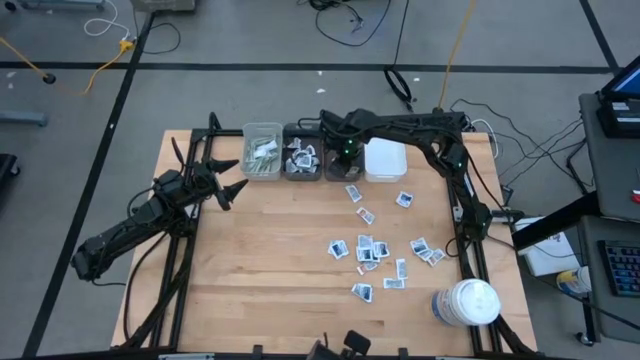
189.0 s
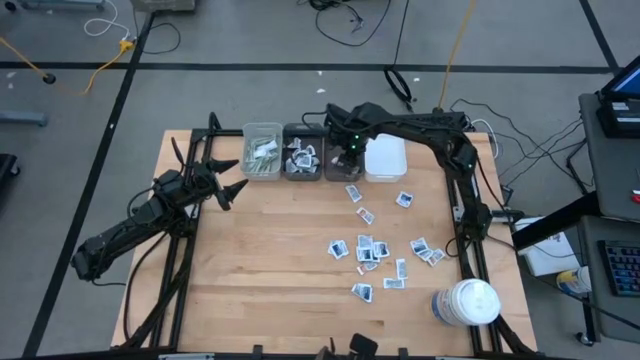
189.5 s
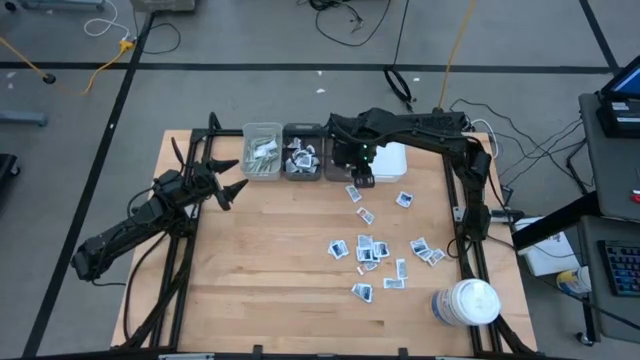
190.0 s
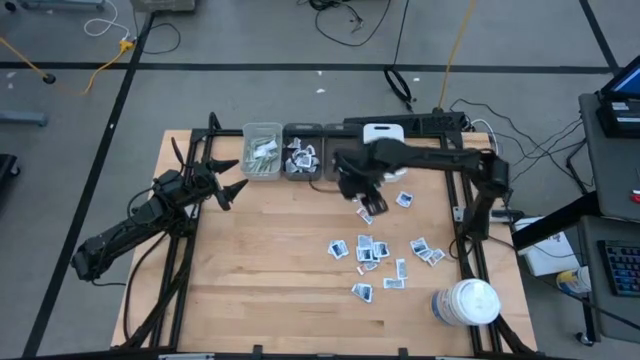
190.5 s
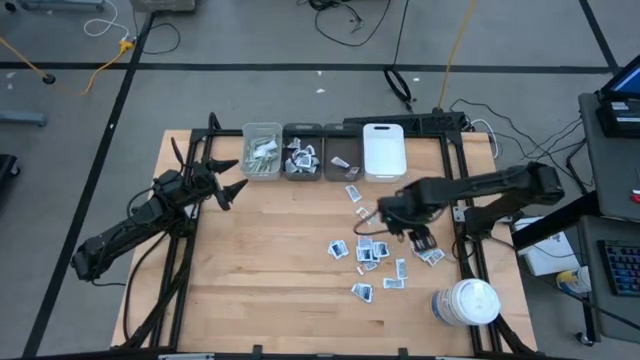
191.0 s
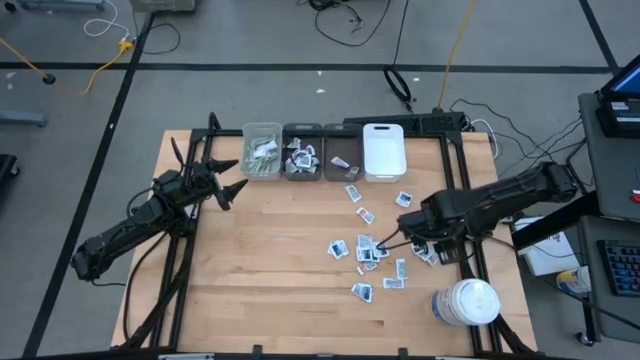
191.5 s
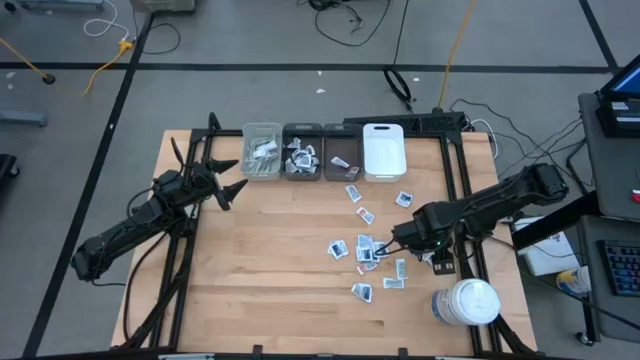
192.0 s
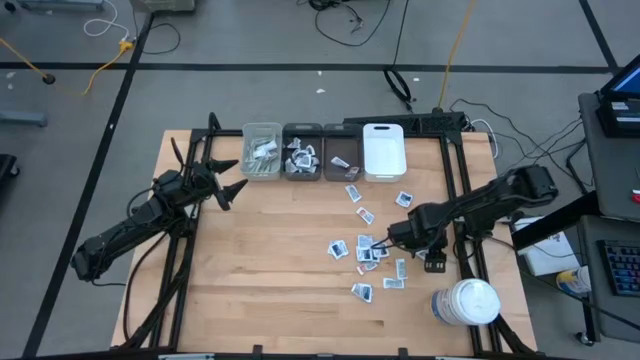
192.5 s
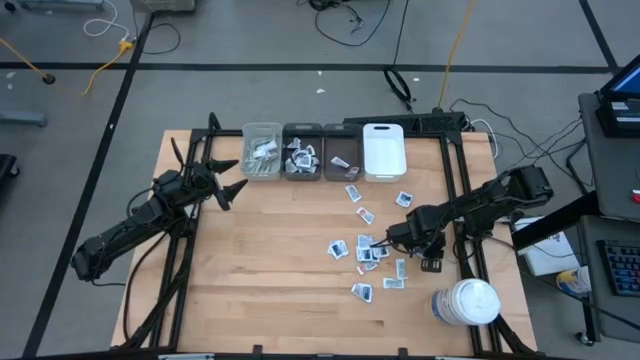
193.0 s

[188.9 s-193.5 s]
Task: Pick & Place First Aid Supplies
Put the ointment pack into the right black bin

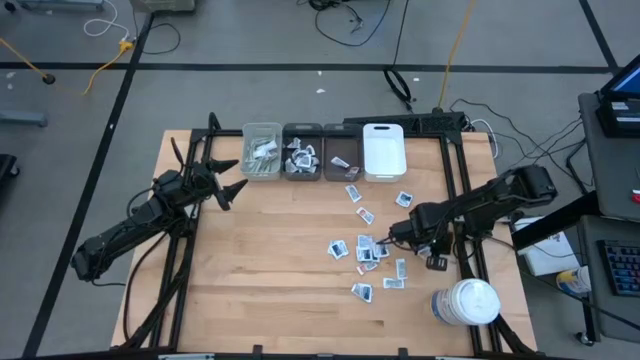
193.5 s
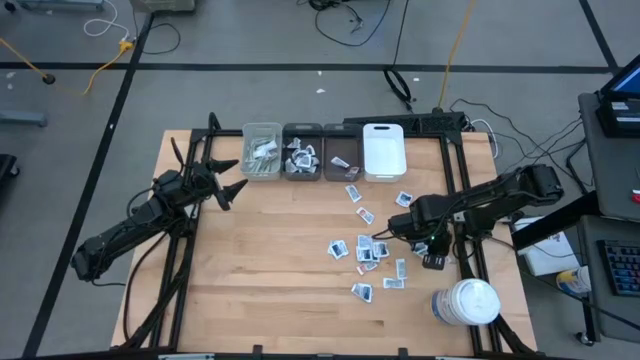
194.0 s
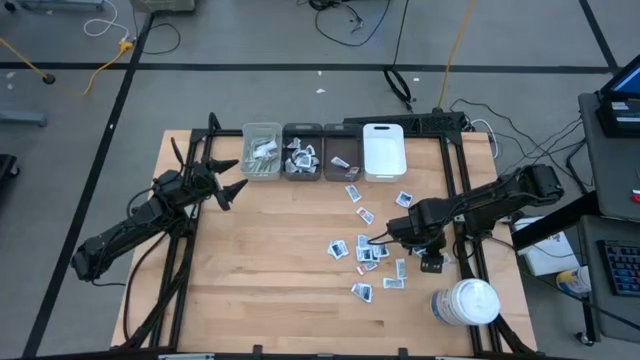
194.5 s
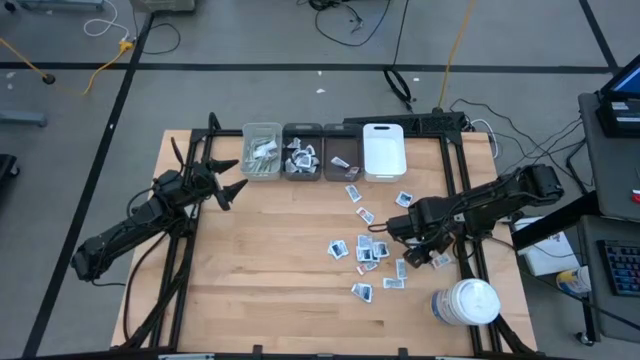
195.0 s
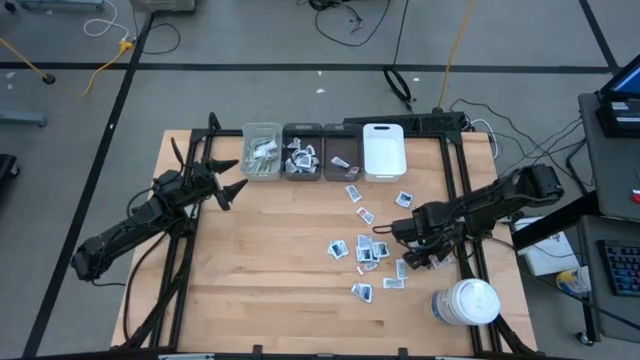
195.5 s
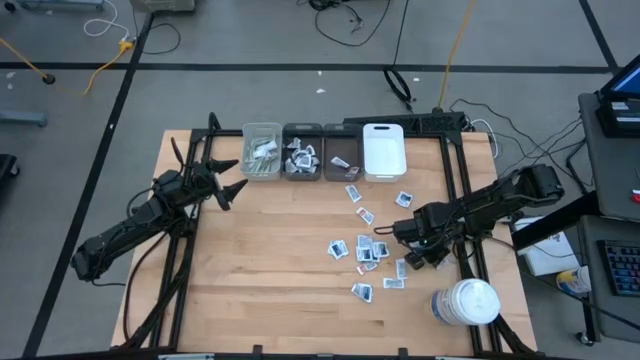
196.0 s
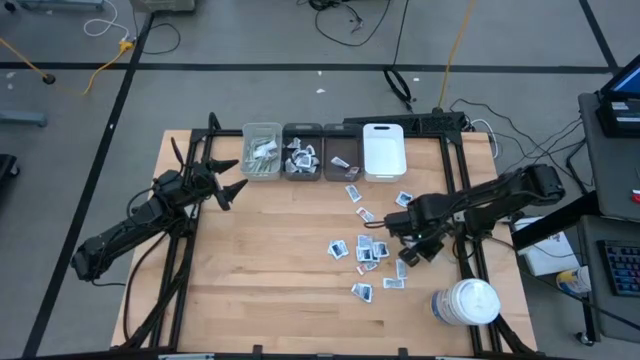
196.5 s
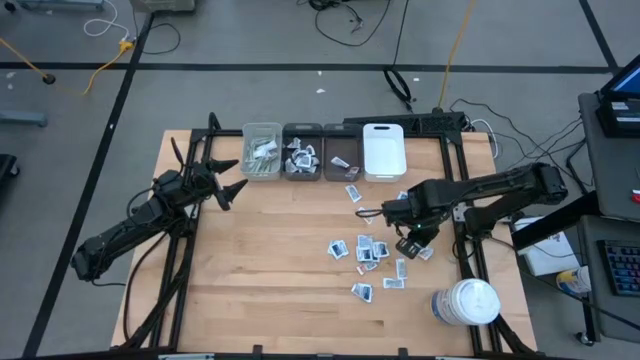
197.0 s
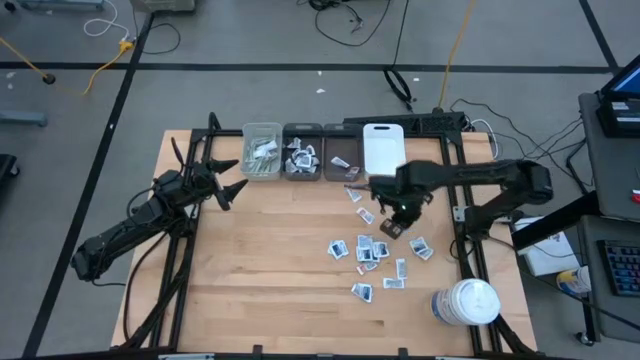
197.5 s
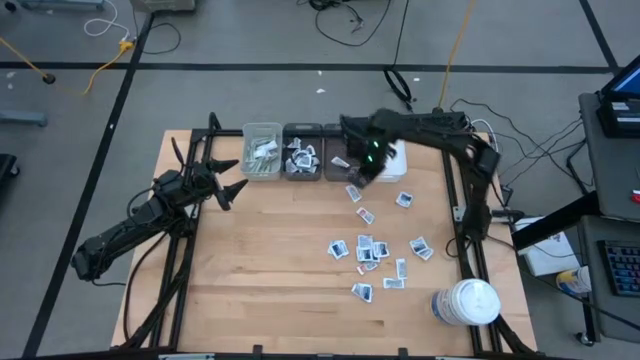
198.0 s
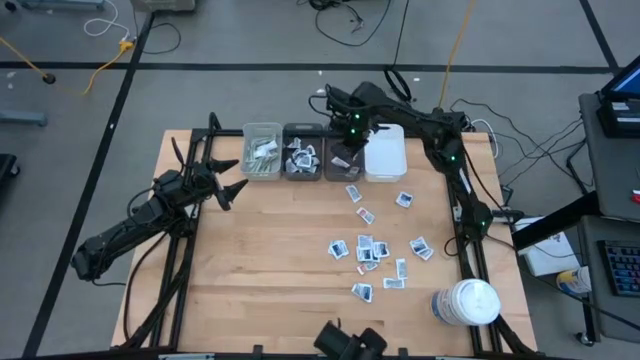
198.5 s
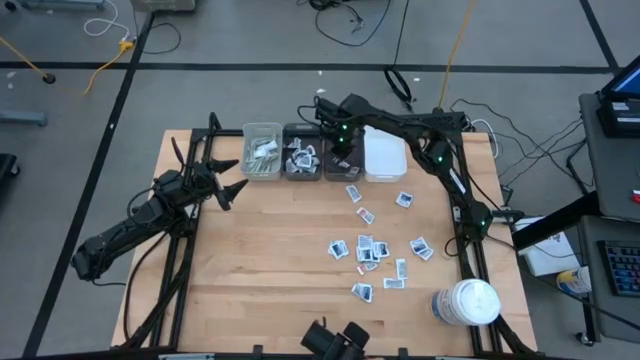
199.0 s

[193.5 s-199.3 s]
Put the ointment pack into the right black bin

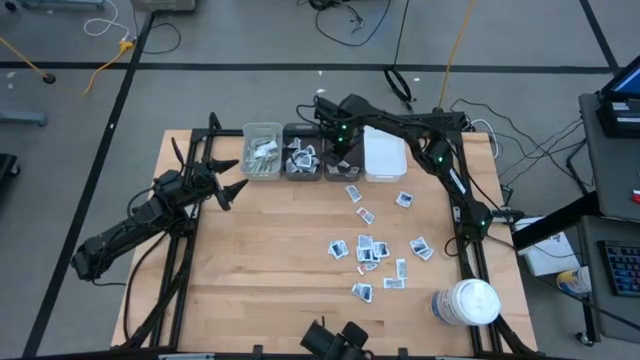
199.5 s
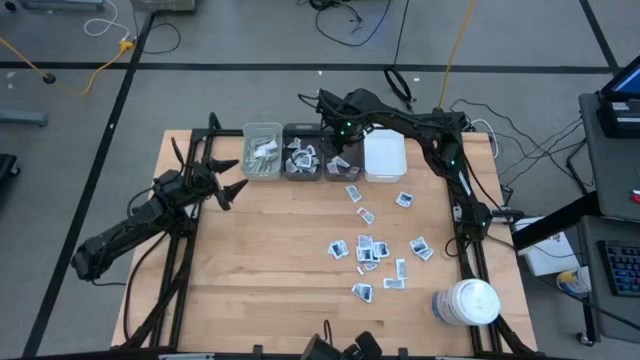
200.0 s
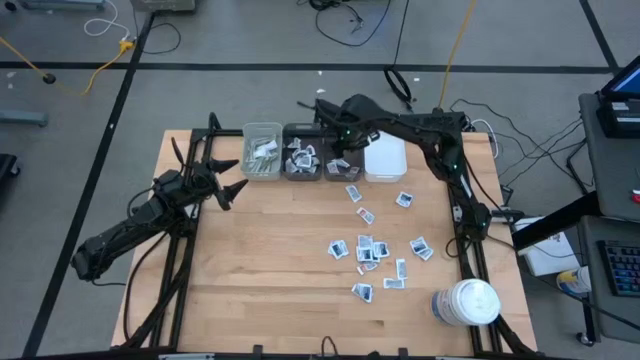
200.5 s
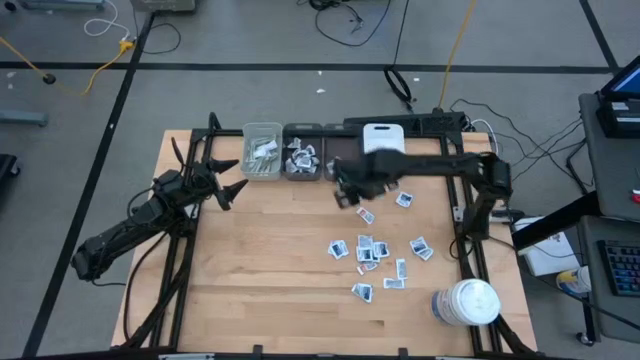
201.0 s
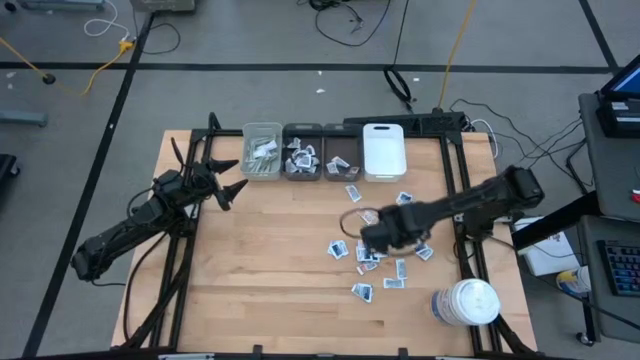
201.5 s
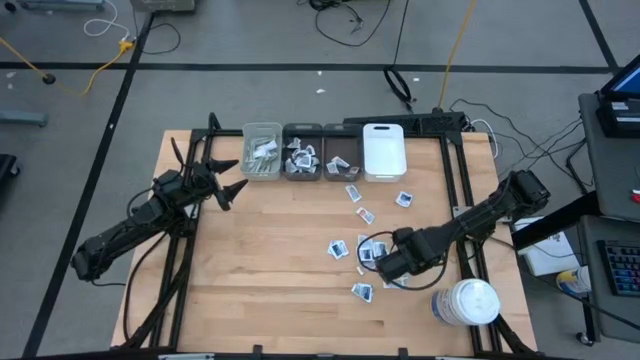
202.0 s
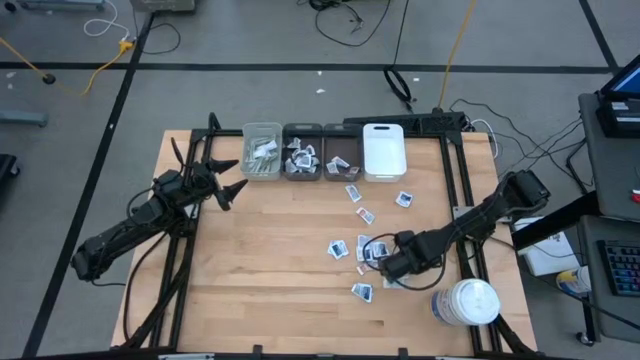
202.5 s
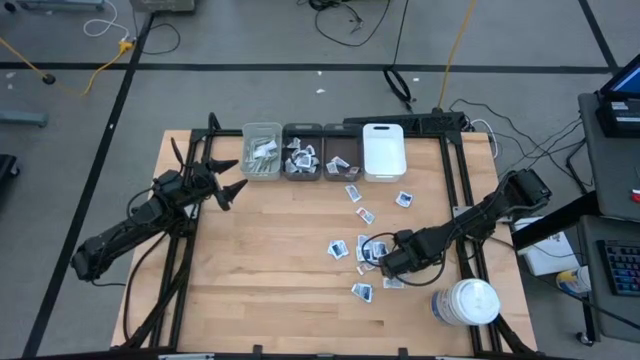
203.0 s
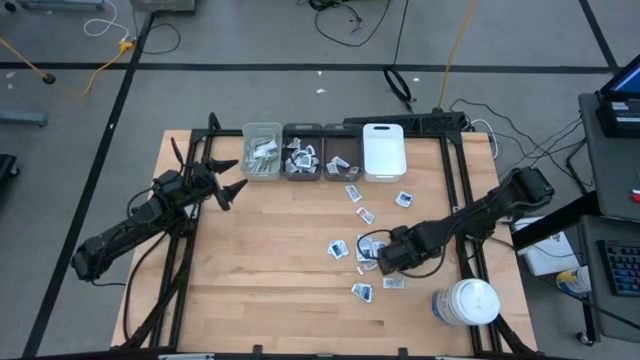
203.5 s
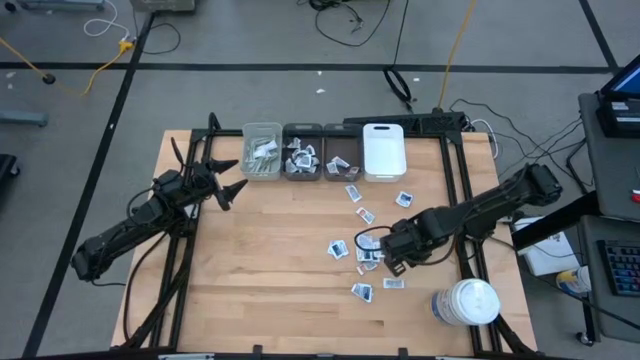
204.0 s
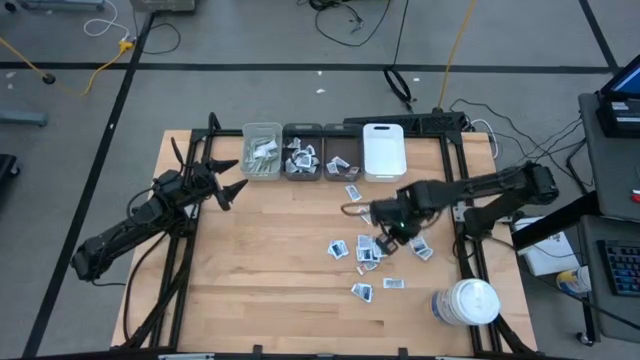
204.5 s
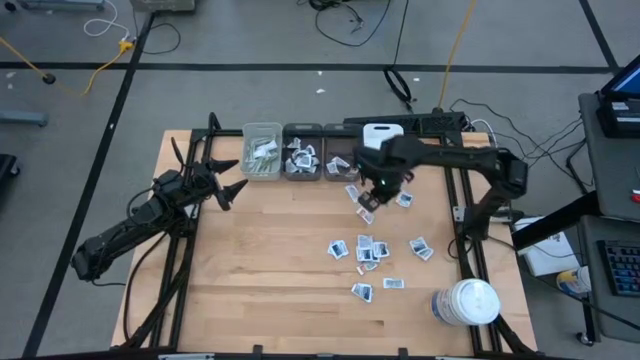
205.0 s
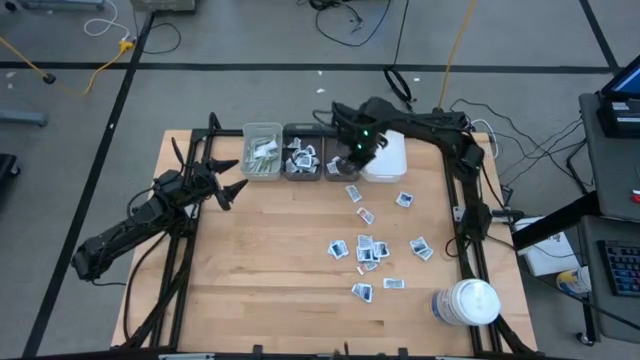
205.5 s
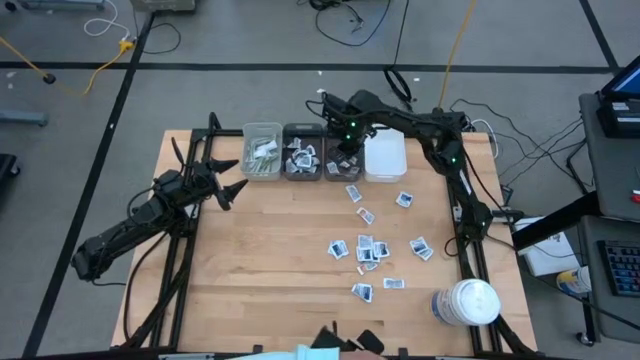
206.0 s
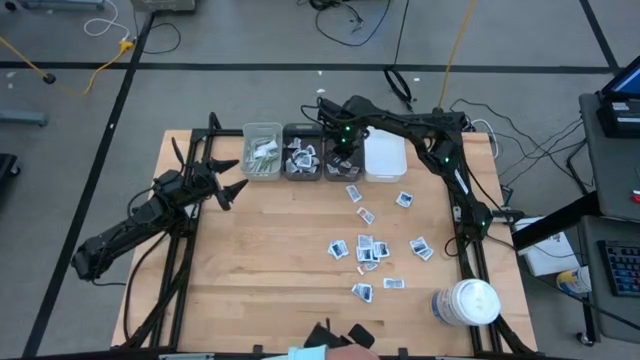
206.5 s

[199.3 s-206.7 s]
Put the ointment pack into the right black bin

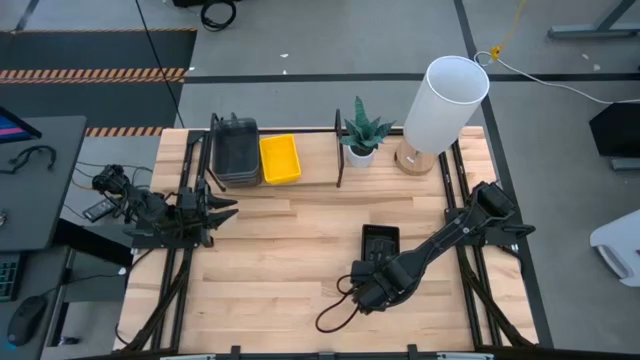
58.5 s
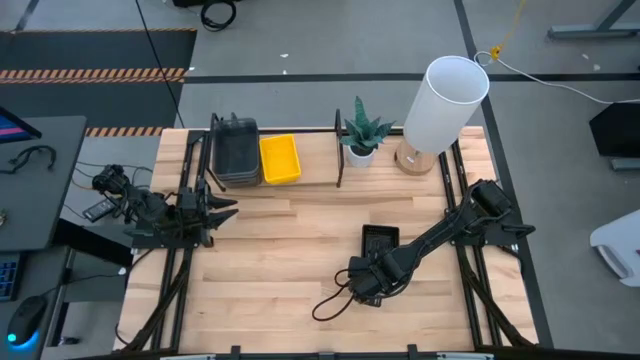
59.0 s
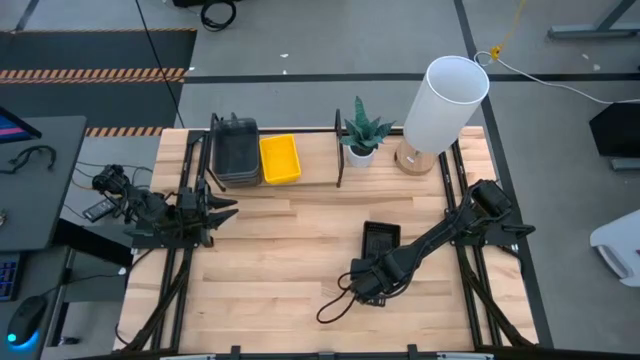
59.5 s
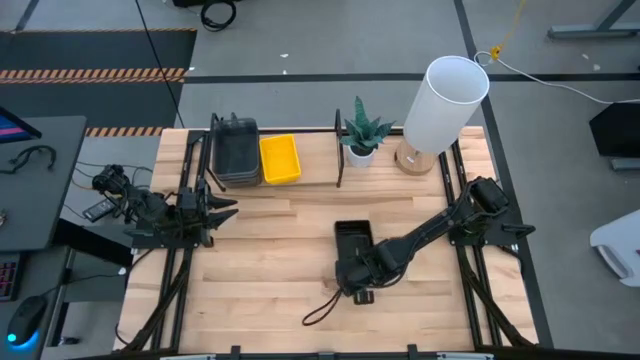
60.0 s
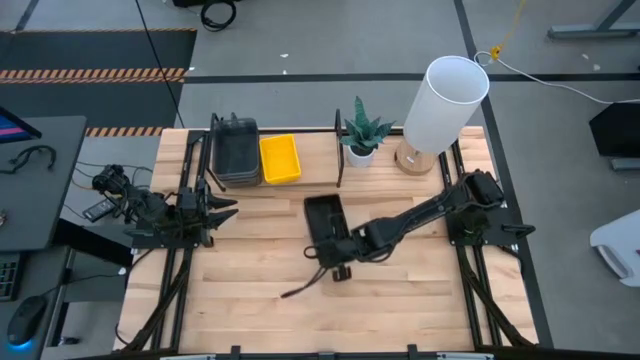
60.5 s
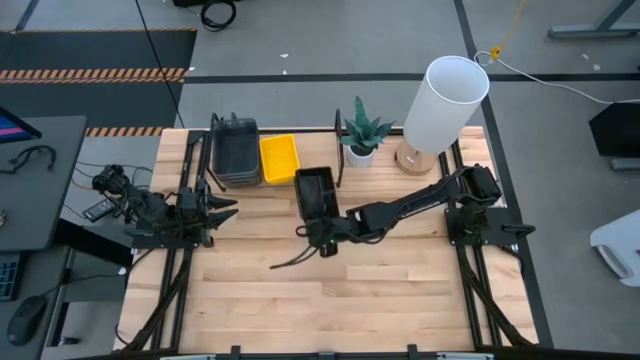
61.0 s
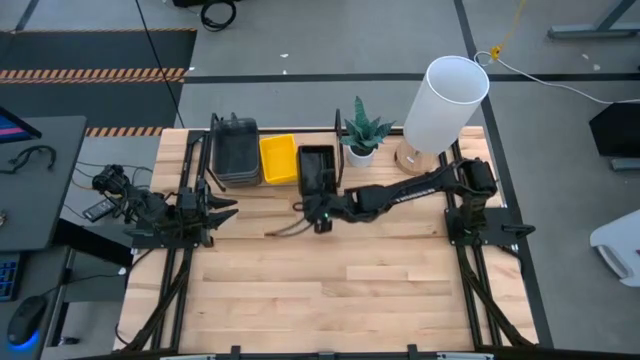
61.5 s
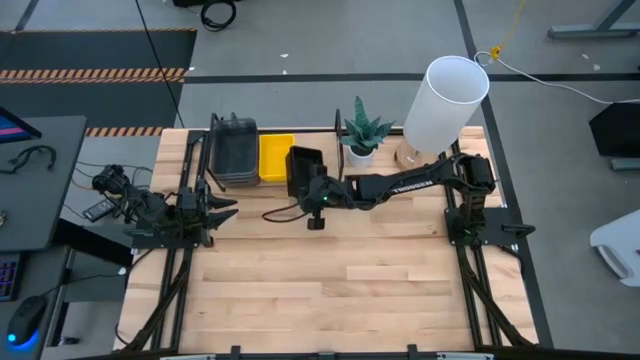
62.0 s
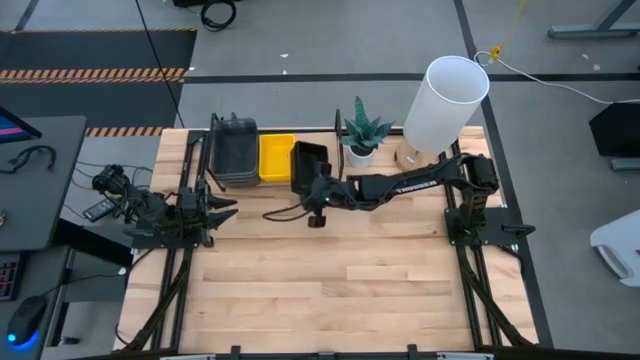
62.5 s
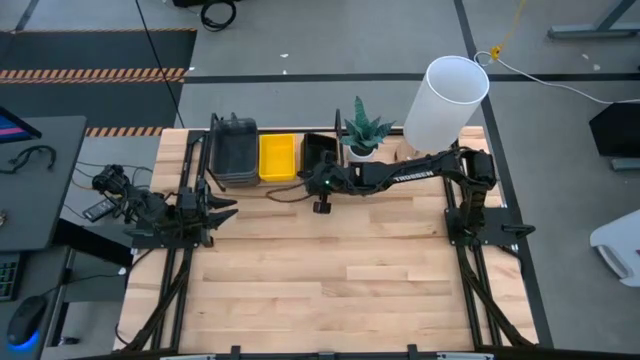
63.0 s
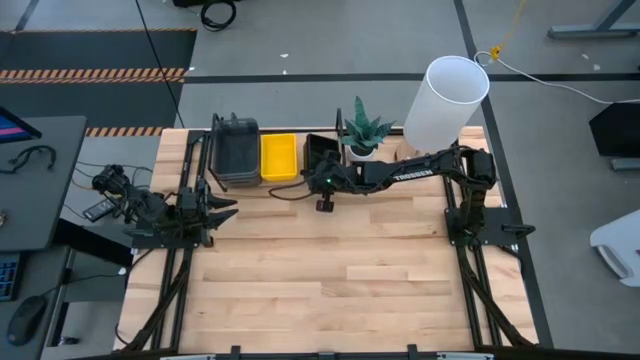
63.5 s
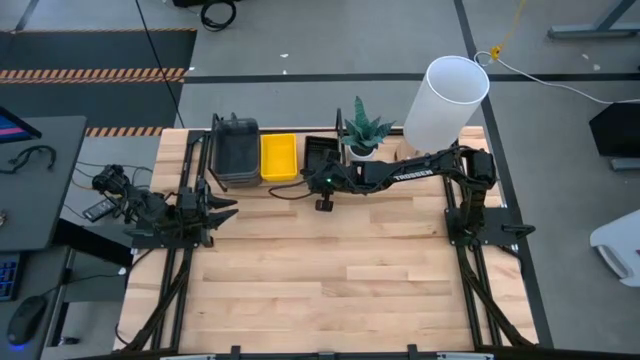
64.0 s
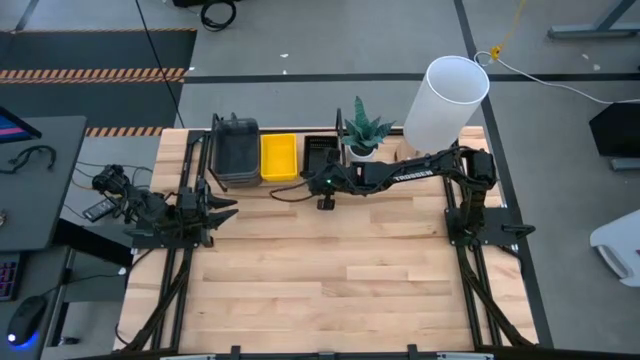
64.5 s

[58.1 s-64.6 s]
Task: Stack baskets on shelf by color
Put the stacked black bins on the shelf
